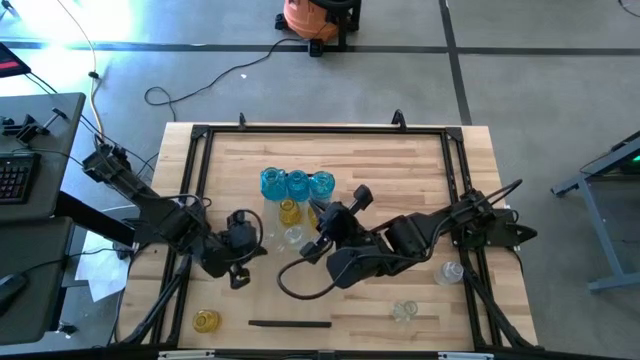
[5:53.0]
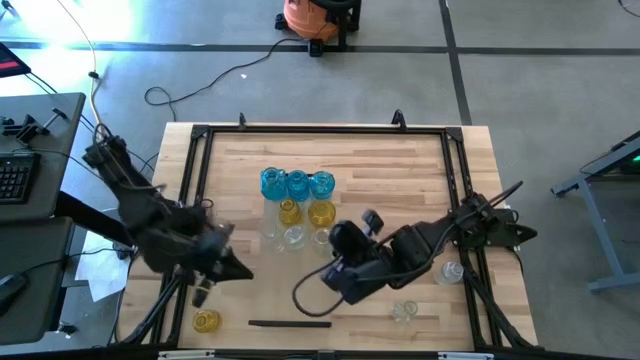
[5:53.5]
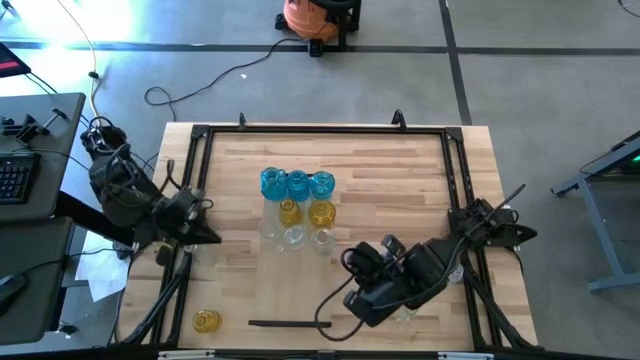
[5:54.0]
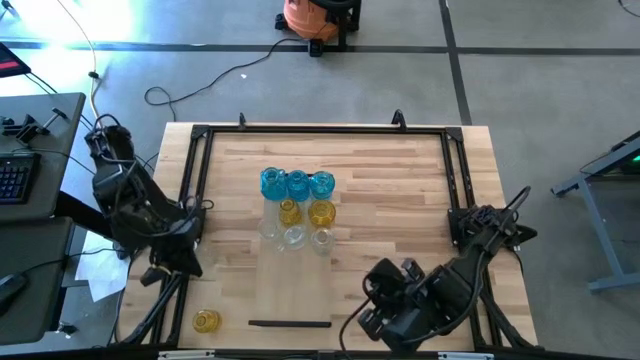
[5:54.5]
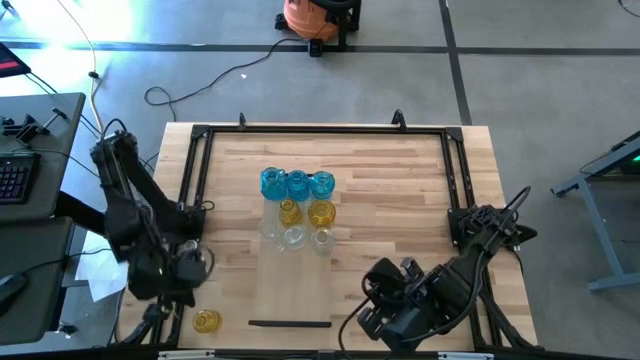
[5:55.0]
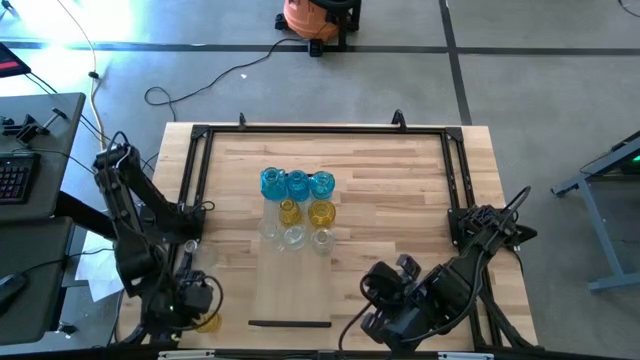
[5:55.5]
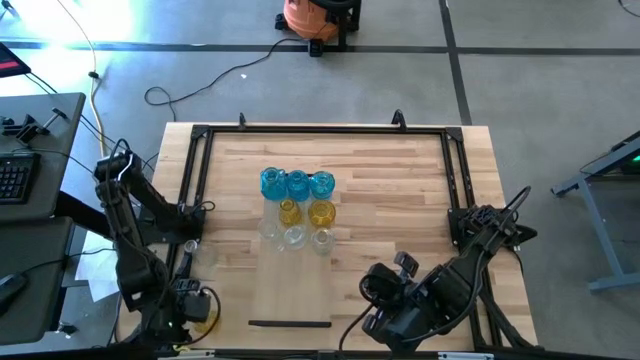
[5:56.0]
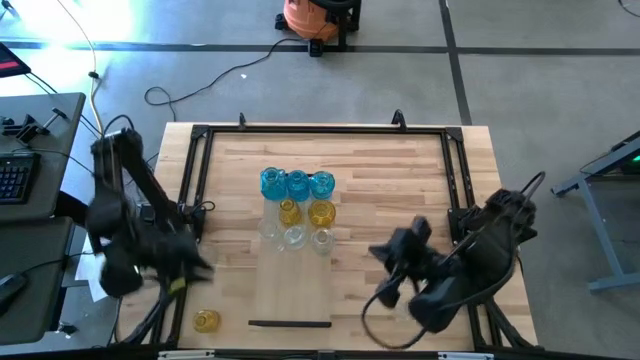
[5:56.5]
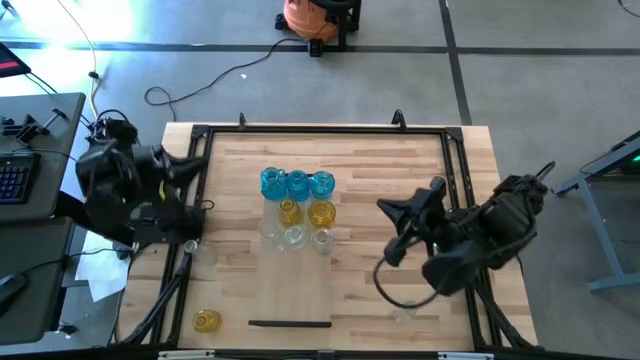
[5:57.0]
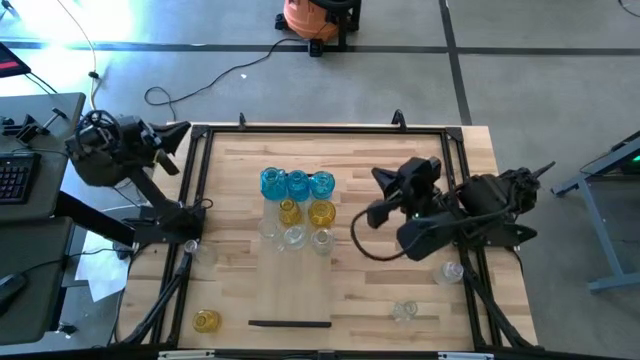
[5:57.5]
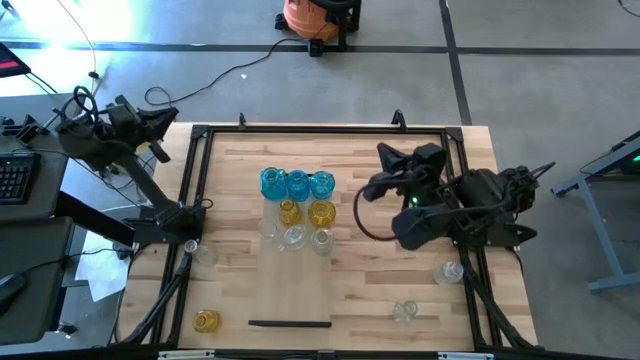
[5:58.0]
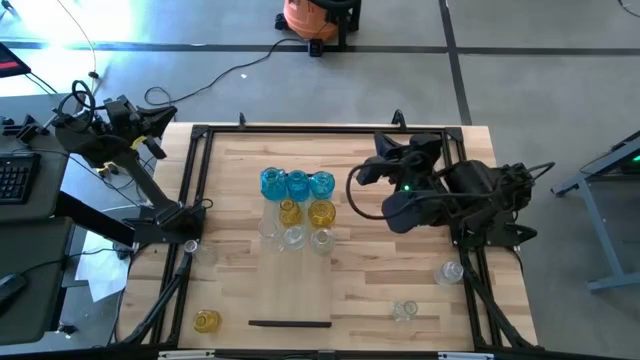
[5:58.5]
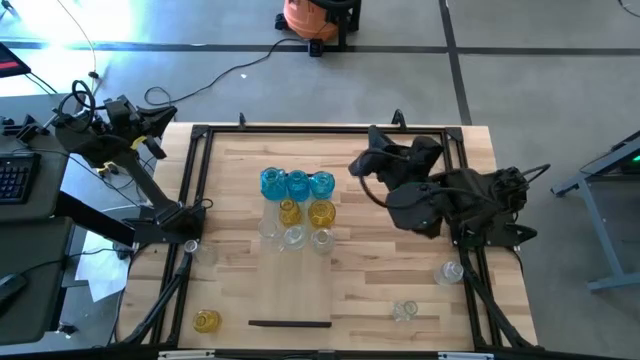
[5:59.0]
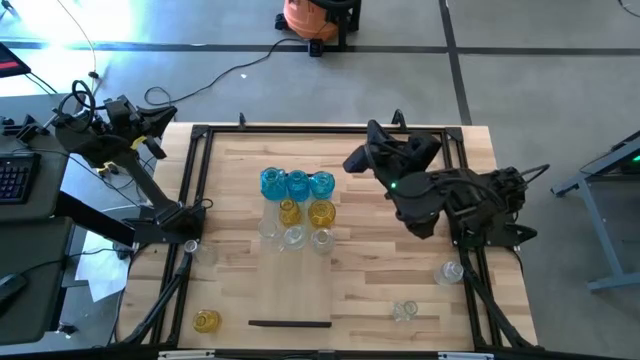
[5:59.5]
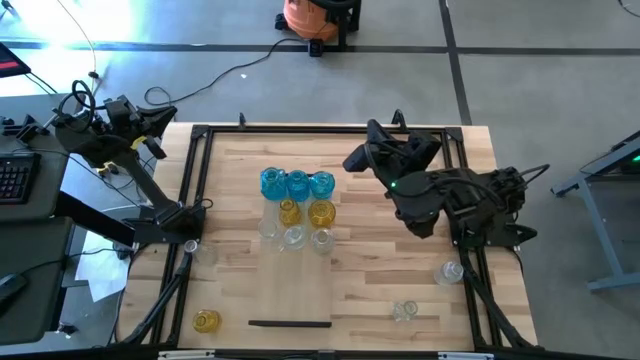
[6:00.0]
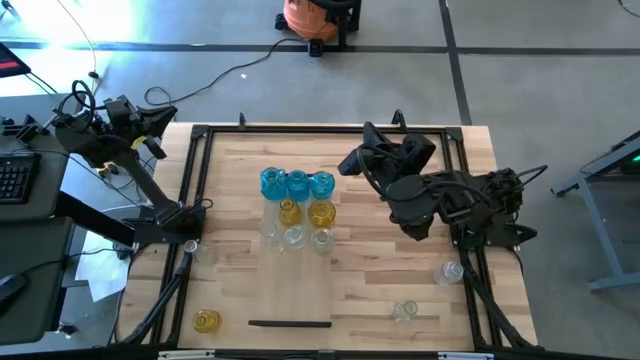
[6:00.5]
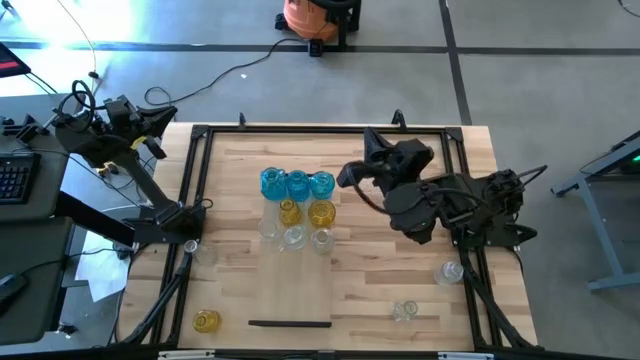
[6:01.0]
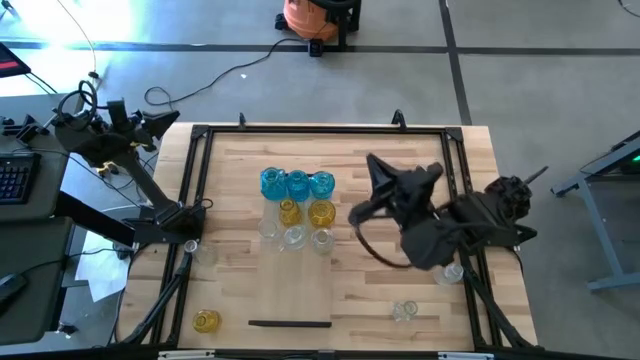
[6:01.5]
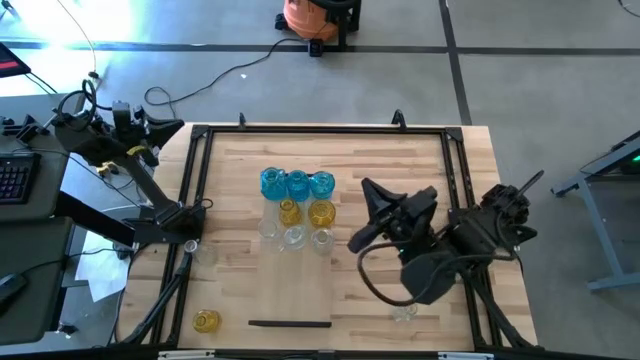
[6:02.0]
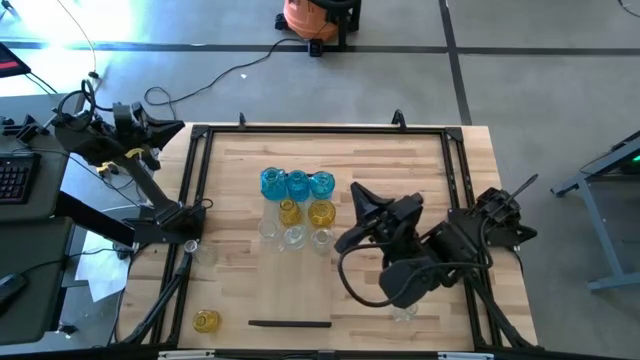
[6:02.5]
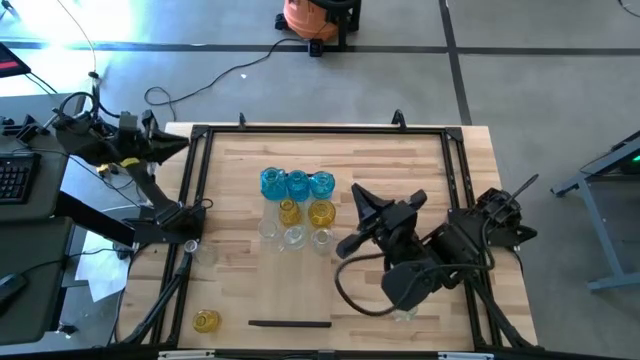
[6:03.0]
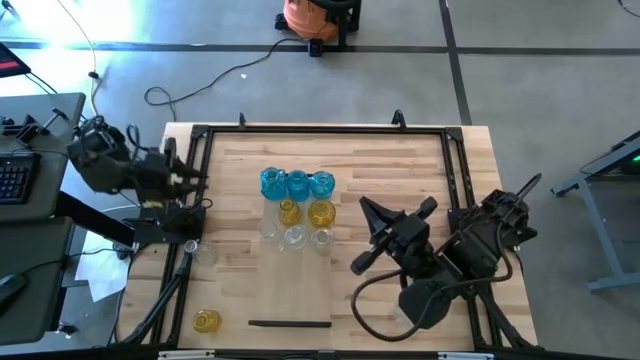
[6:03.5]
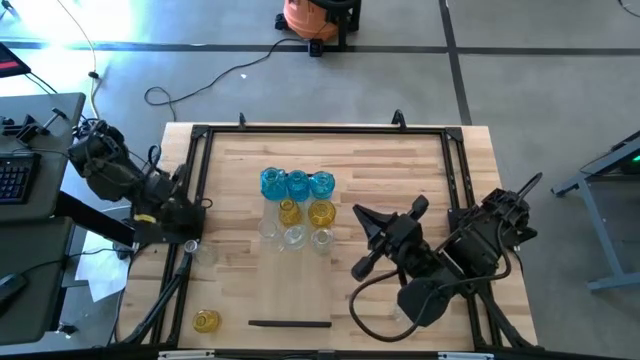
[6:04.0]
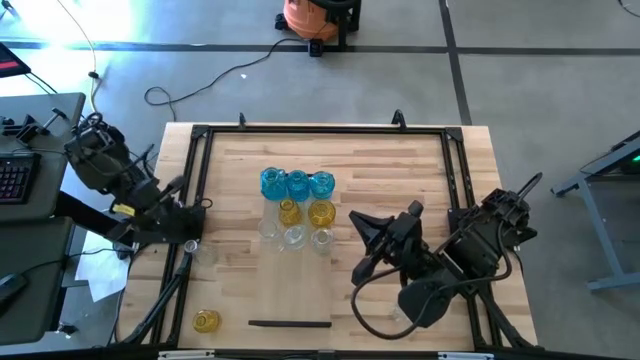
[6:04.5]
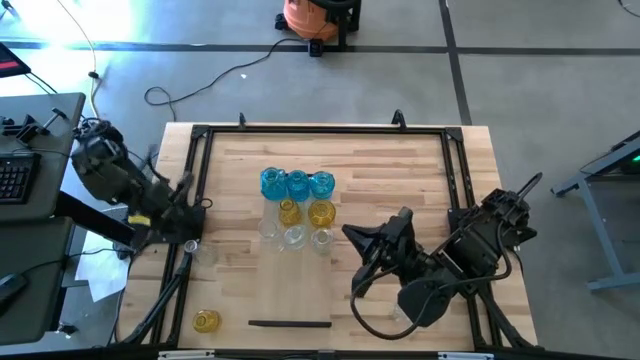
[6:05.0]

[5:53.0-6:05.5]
Task: sort vases onto shelf
Put the yellow vase on the shelf to align with the other yellow vases

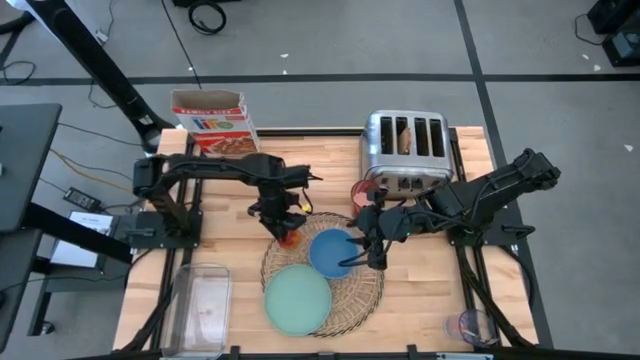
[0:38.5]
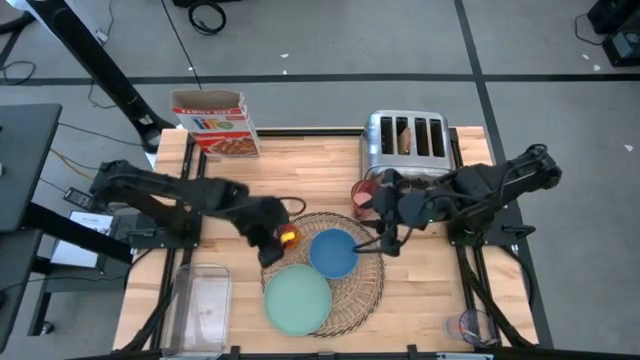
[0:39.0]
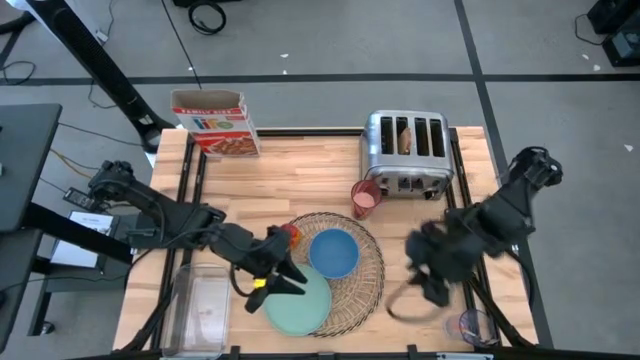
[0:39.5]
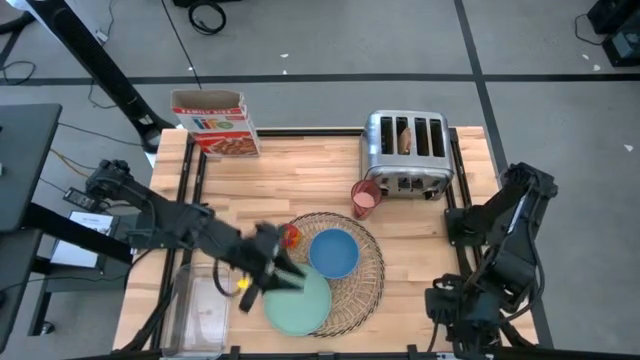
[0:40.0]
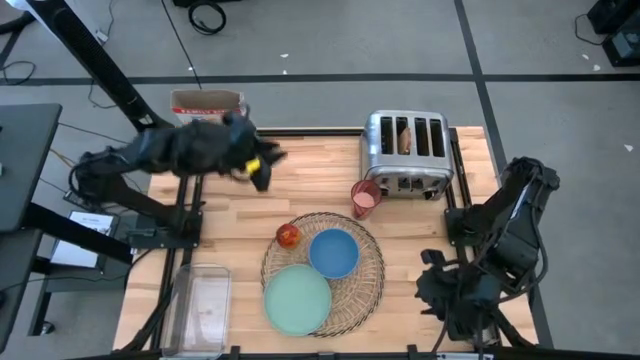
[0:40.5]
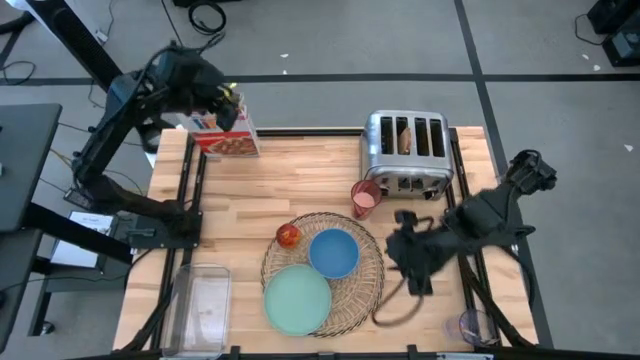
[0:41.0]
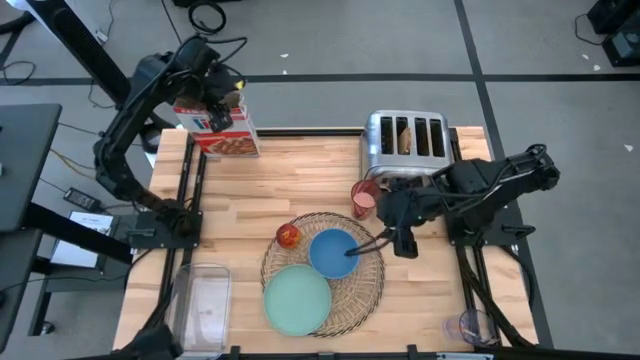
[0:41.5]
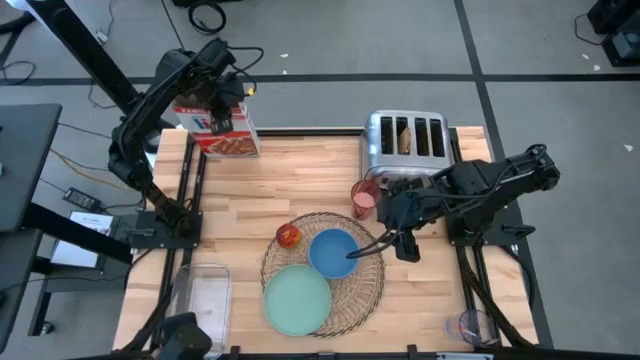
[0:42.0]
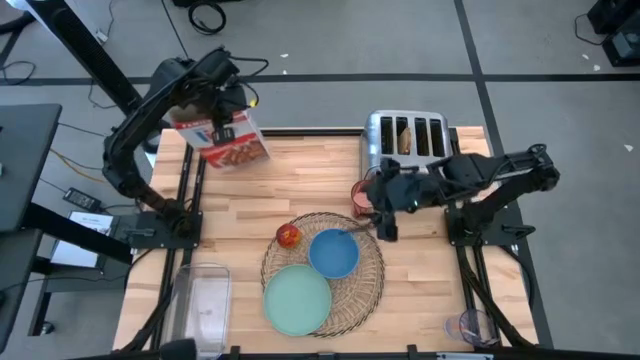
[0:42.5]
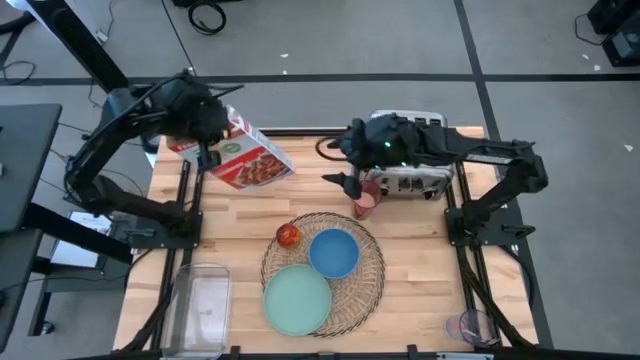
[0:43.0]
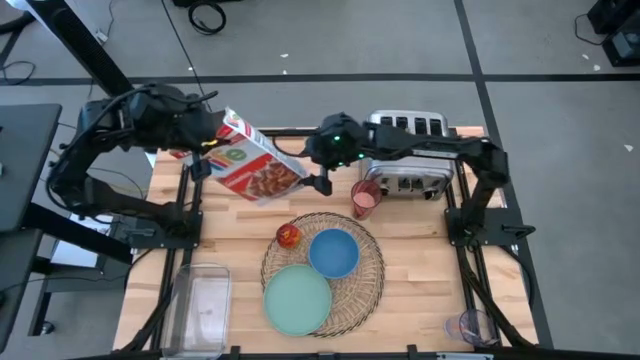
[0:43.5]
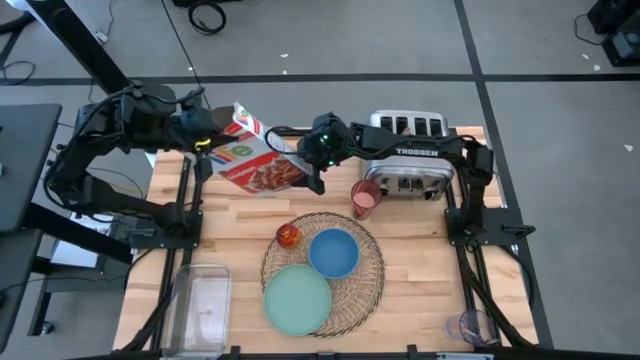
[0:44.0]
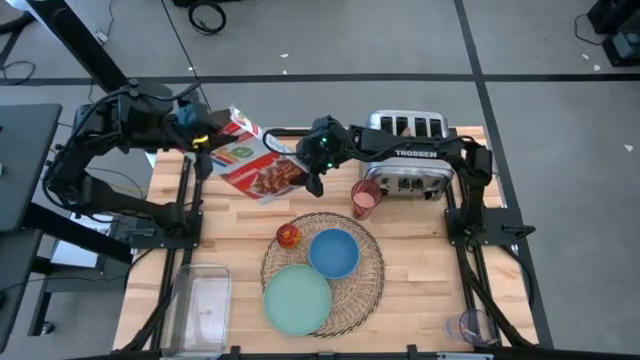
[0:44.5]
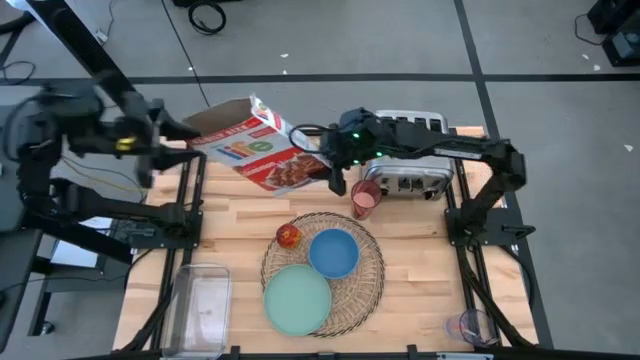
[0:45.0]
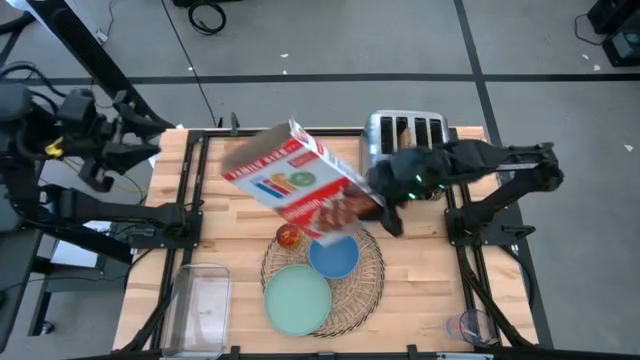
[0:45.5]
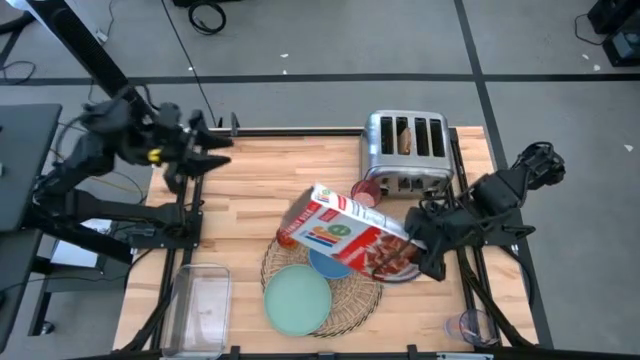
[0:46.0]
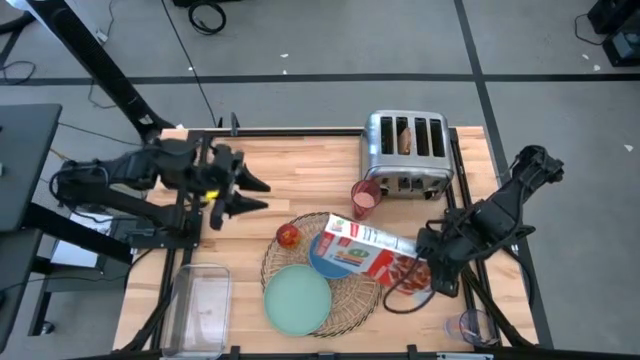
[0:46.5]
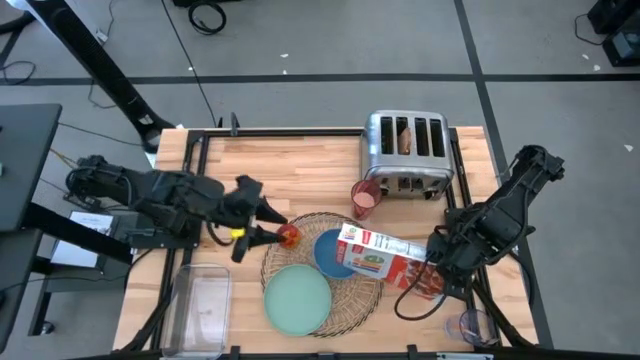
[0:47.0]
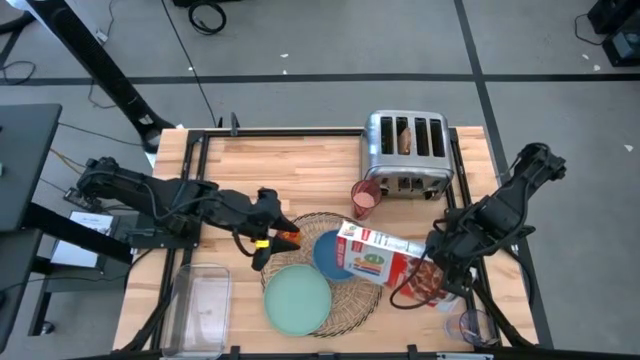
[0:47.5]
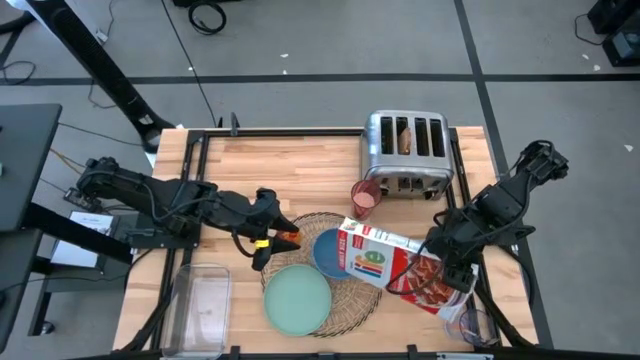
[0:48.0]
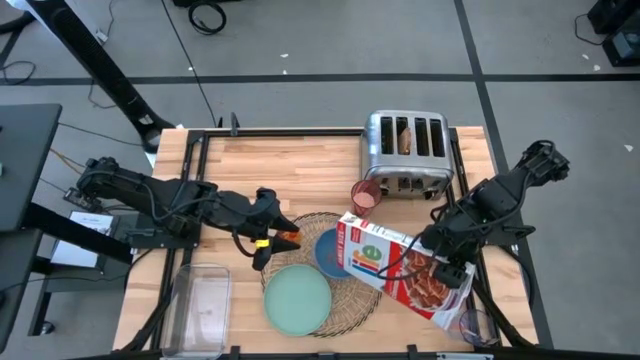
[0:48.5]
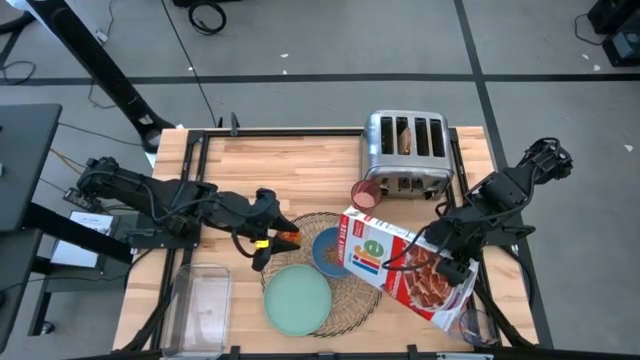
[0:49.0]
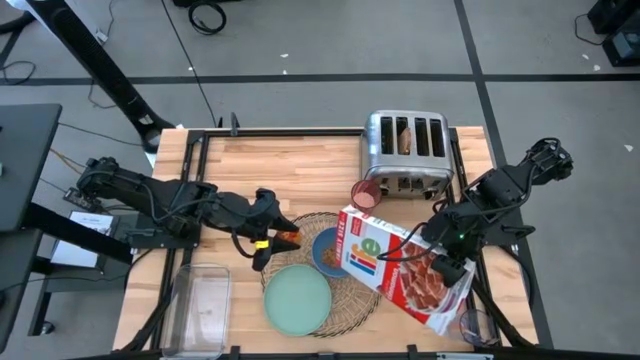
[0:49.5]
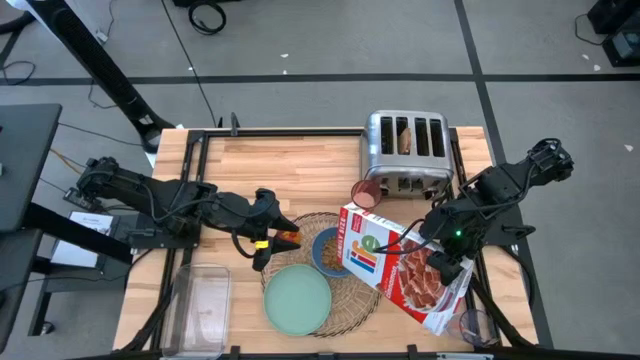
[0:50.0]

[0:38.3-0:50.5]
Task: Arrange a breakfast setting
Pour the cereal from the cereal box into the blue bowl
